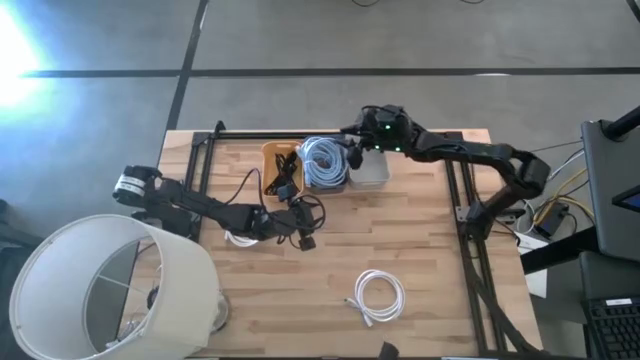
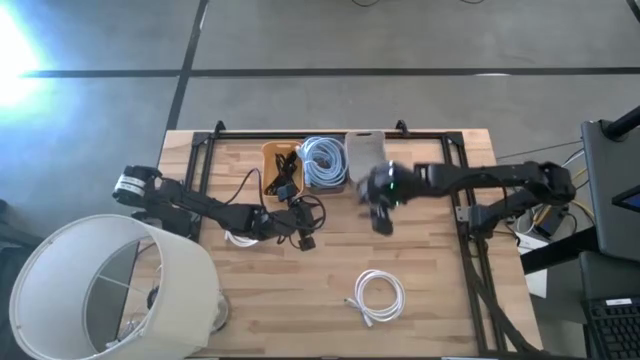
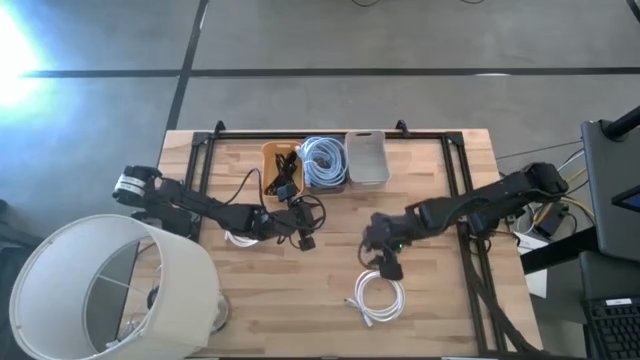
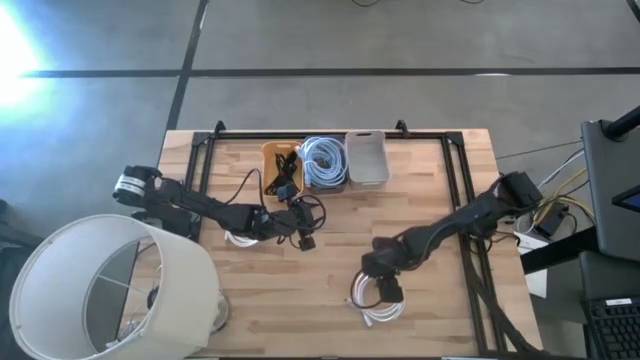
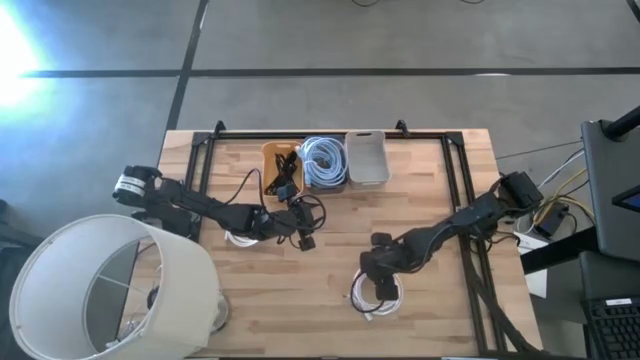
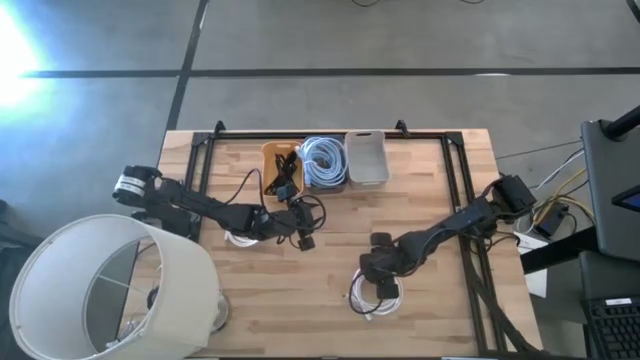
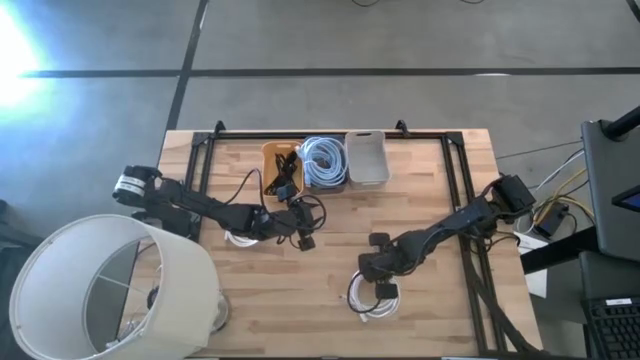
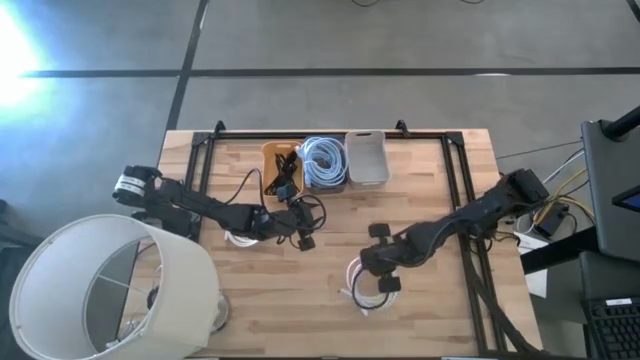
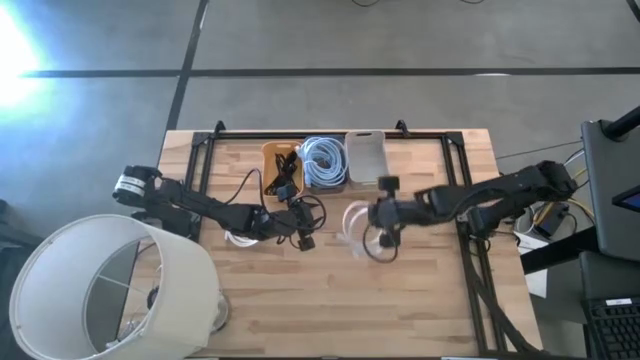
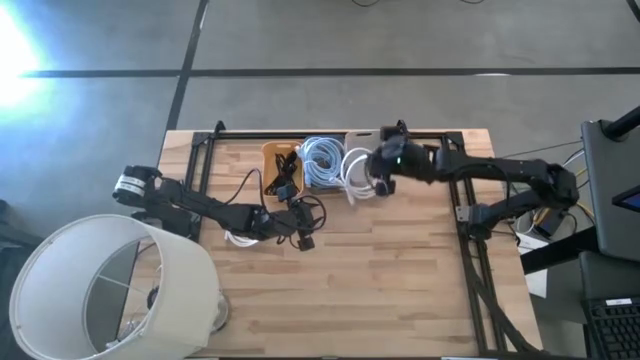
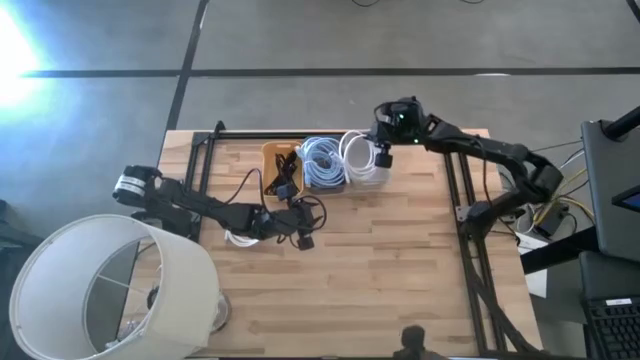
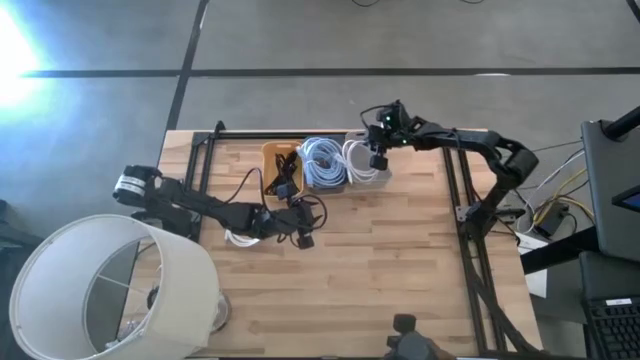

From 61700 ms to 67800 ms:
Task: Pick & Place USB Port
Put the bottom white hdmi cable into the gray bin

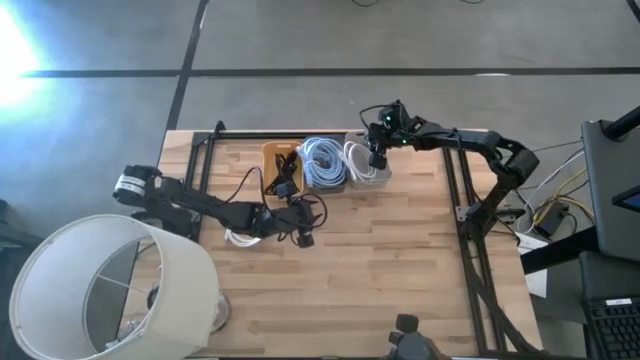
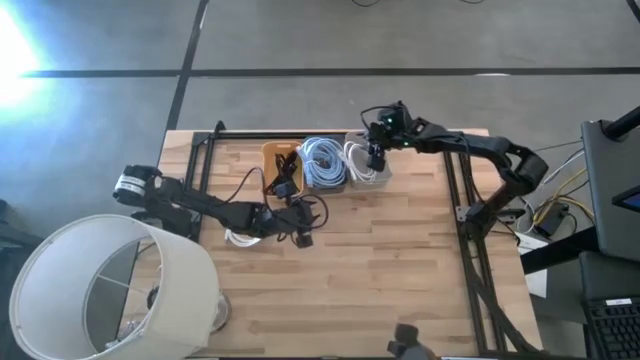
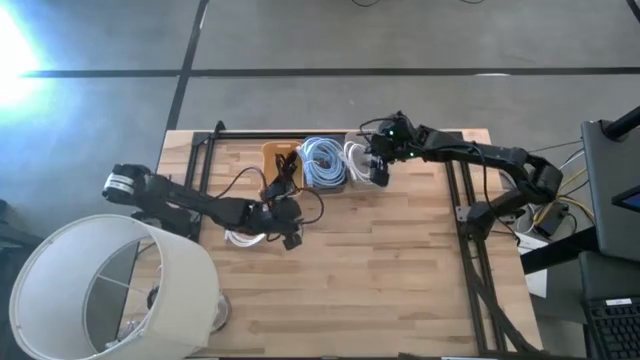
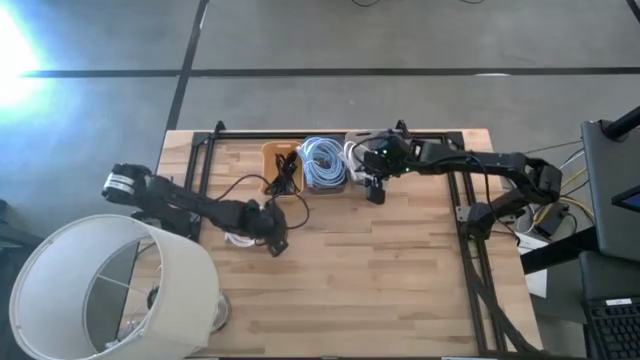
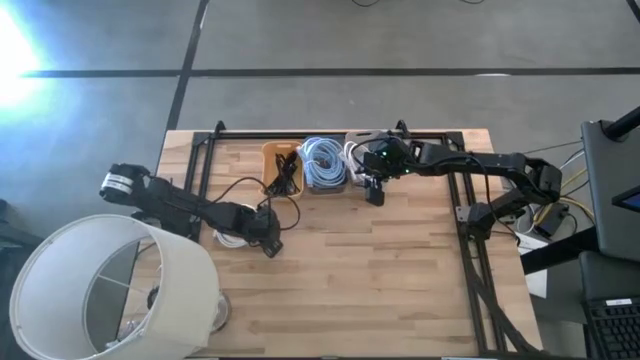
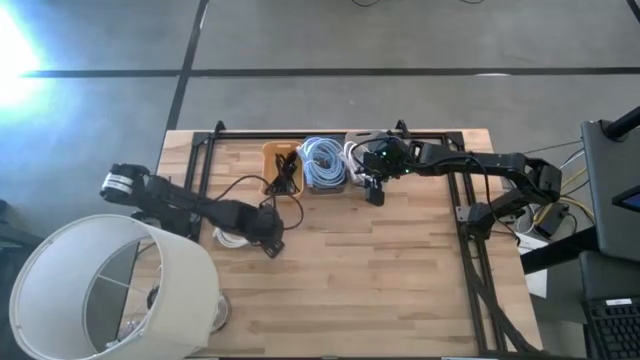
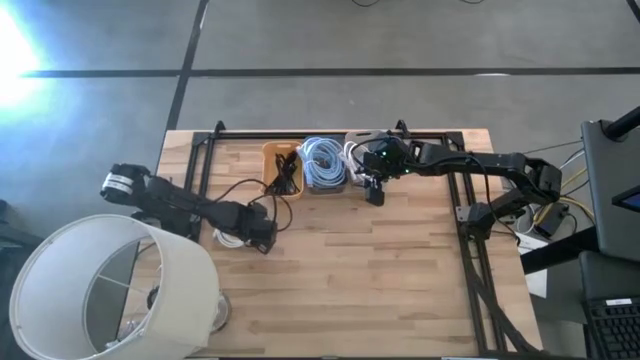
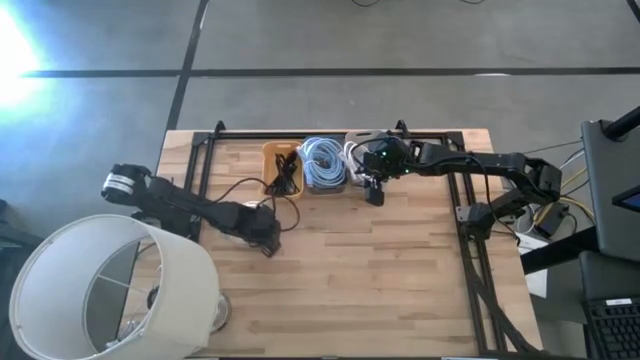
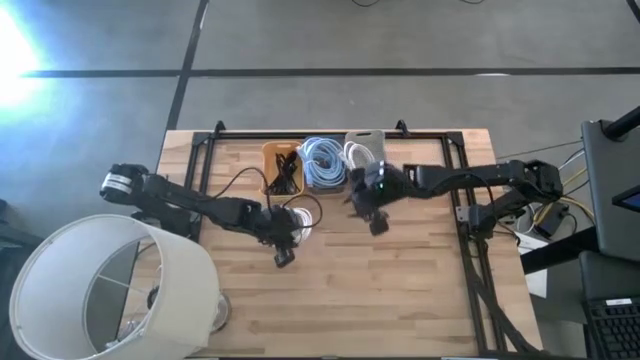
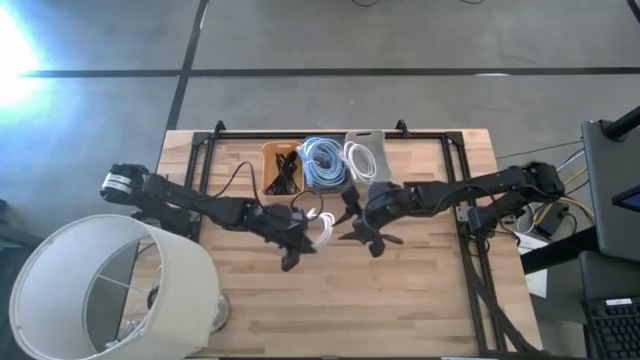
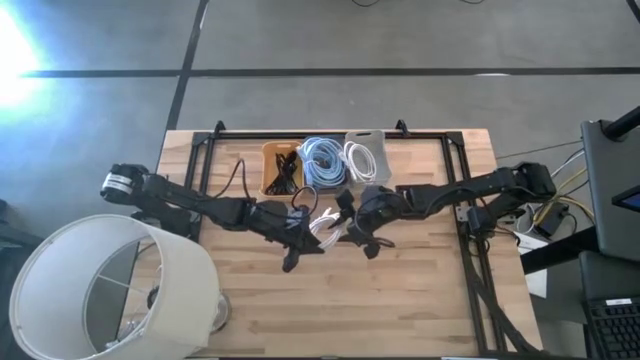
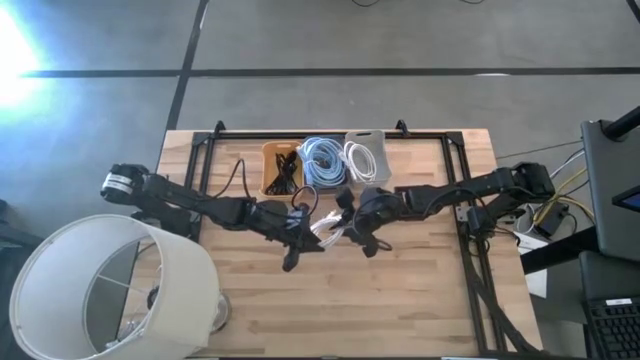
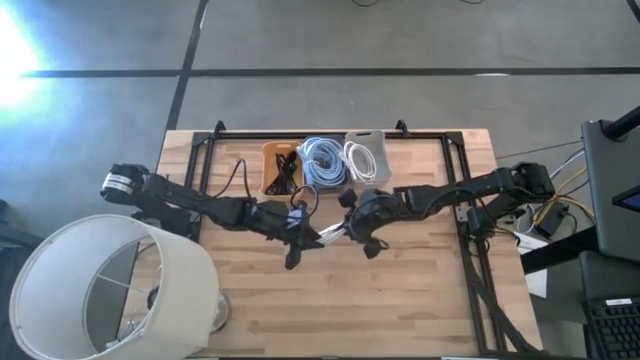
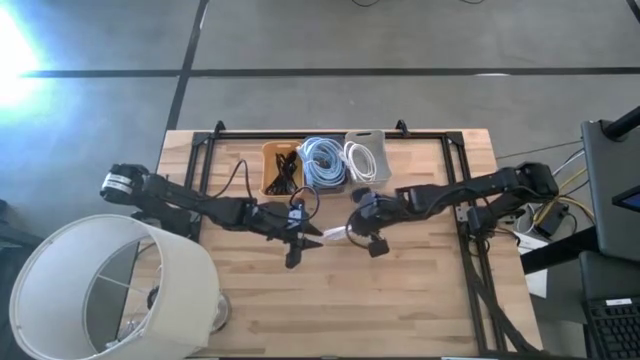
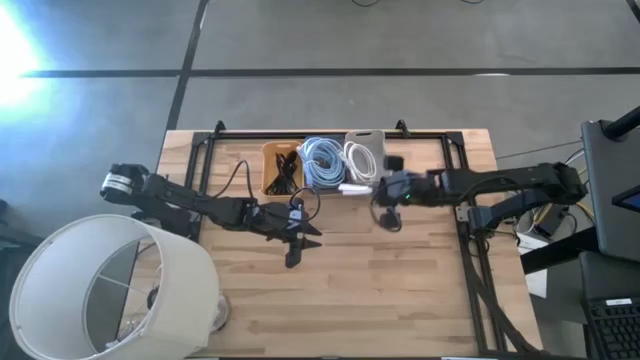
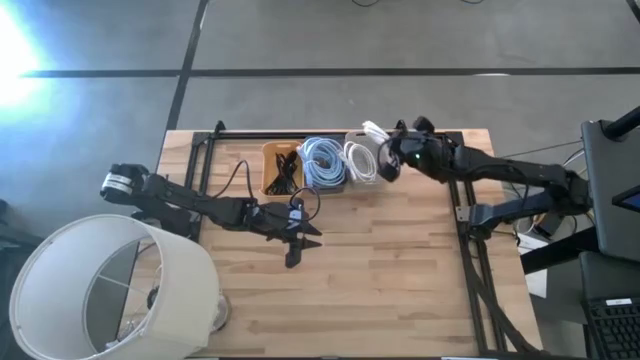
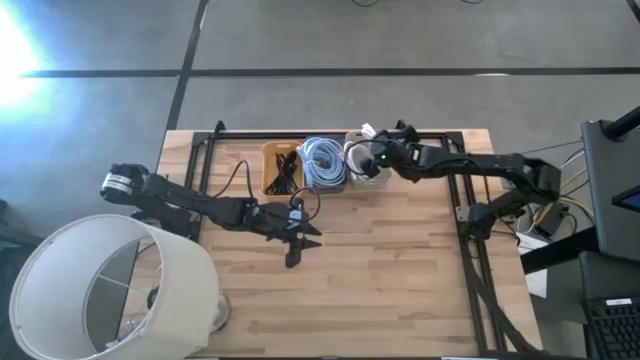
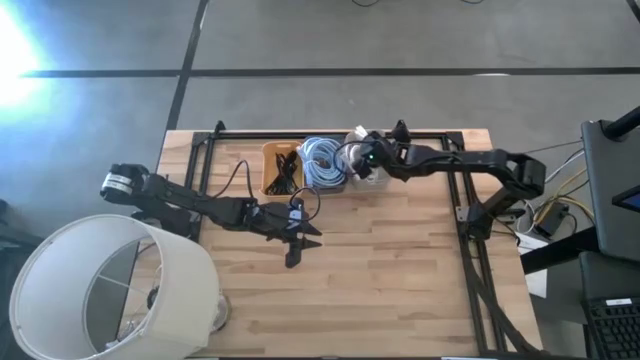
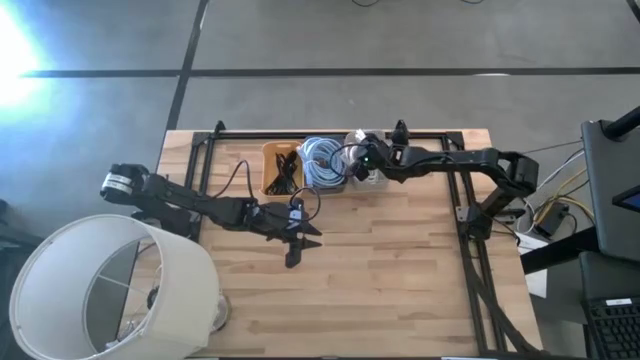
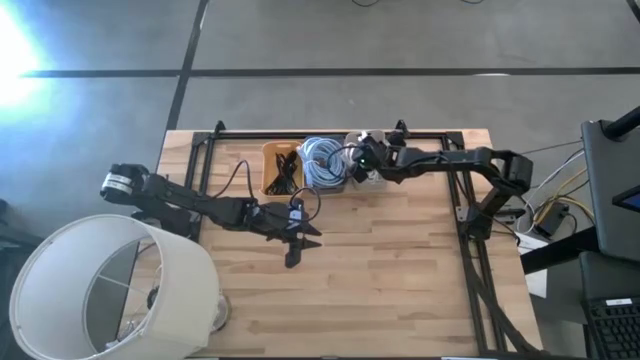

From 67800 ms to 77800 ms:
Put the white hdmi cable into the gray bin

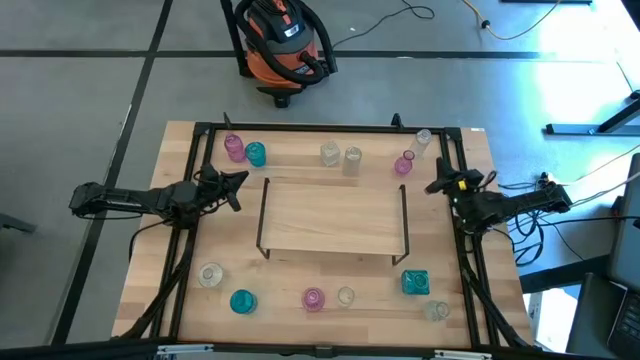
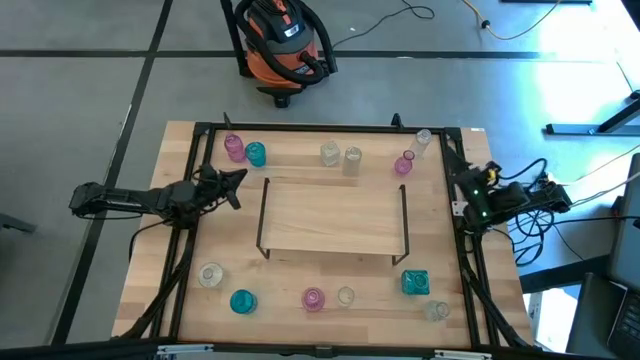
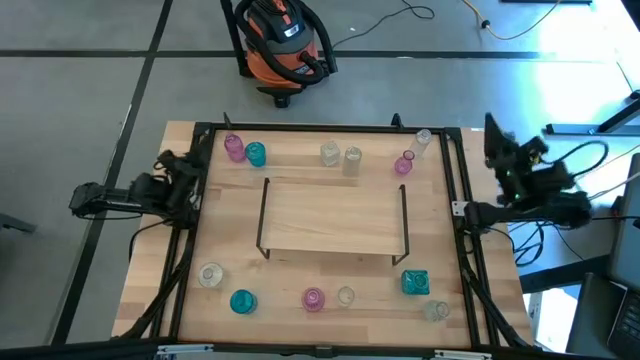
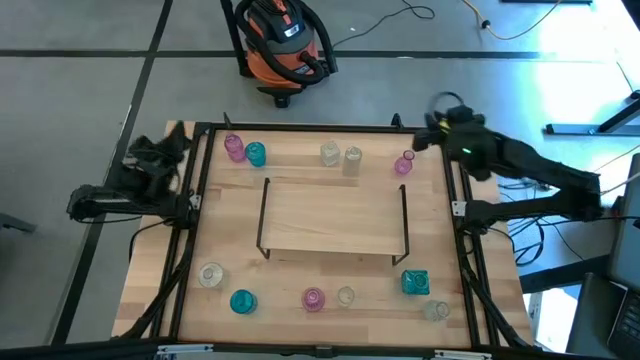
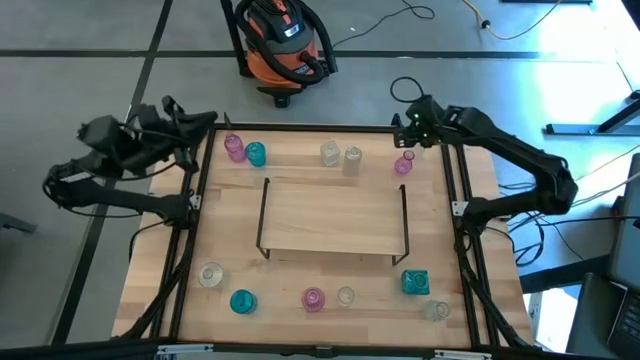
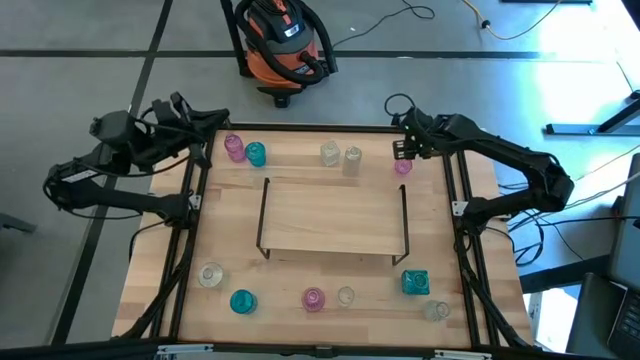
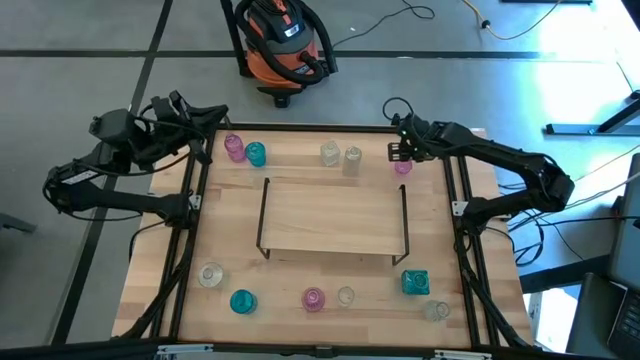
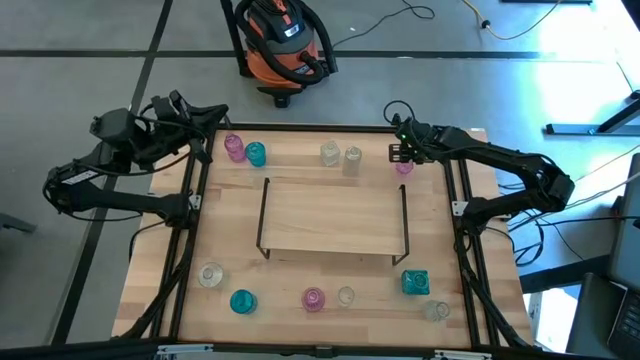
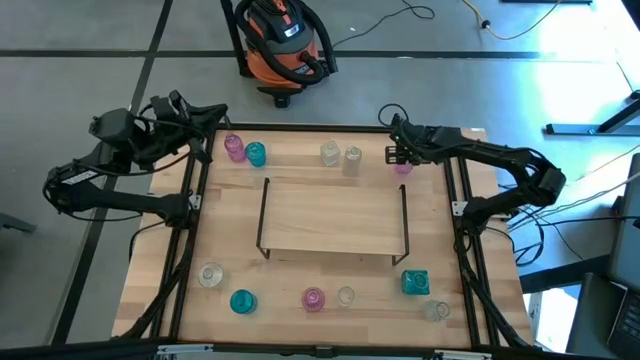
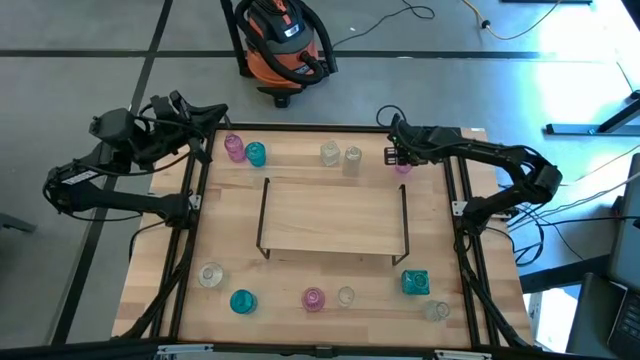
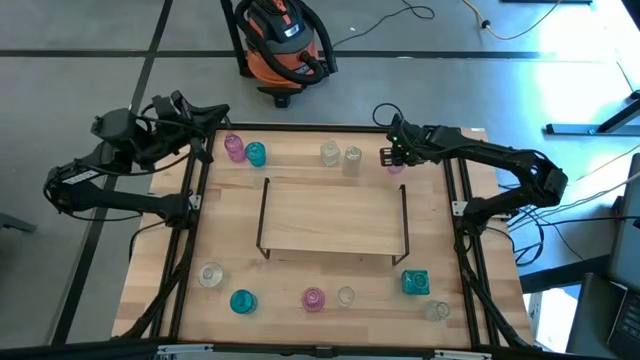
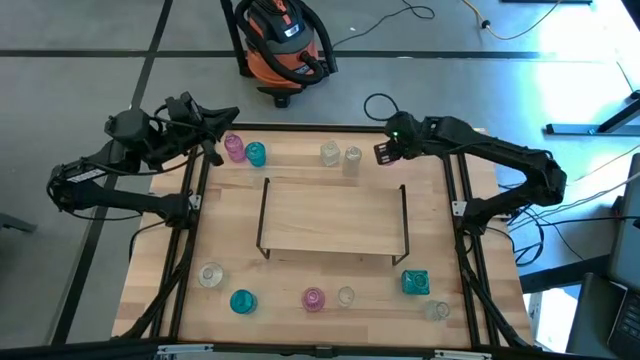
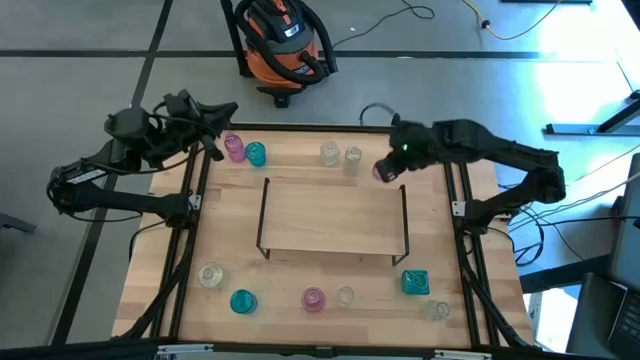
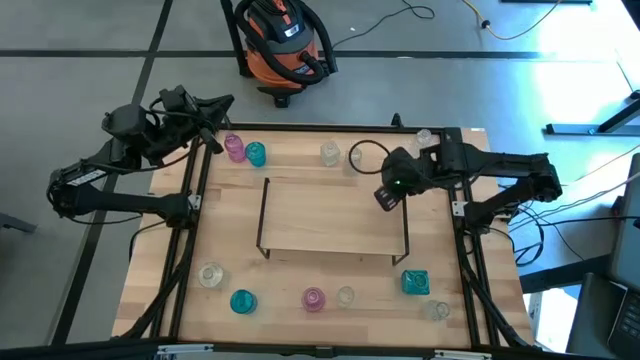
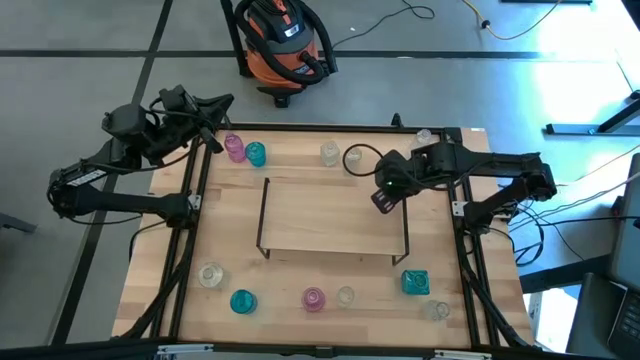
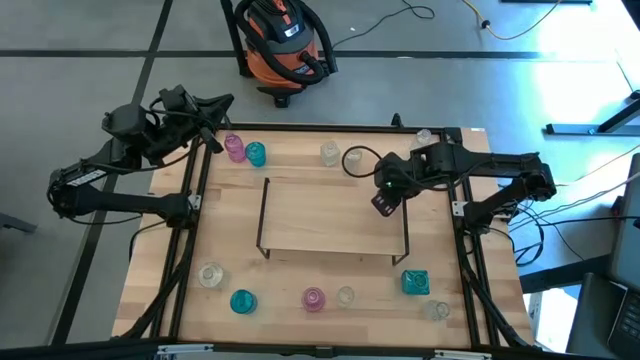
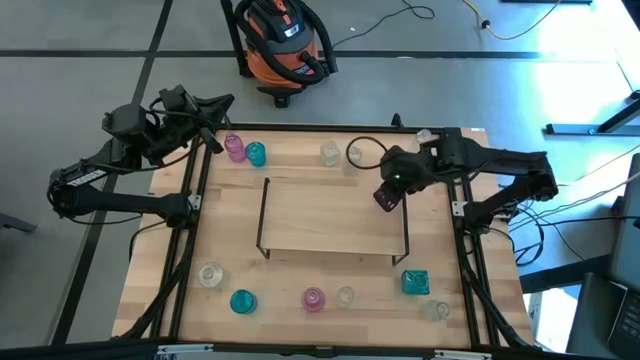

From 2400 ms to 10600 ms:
Task: sort vases onto shelf
Put the top right pink vase on the shelf
